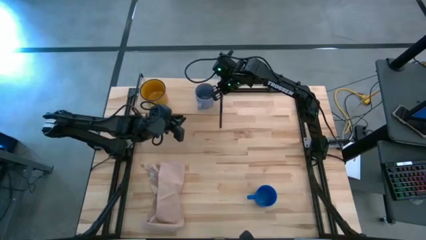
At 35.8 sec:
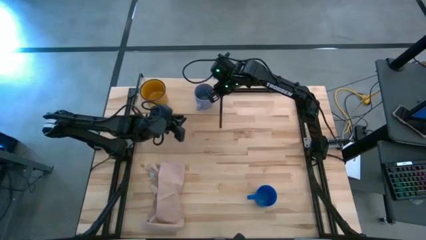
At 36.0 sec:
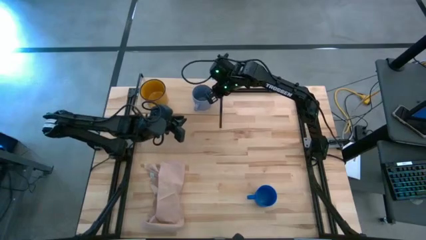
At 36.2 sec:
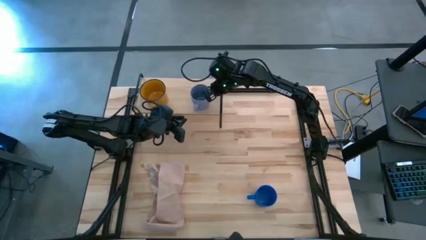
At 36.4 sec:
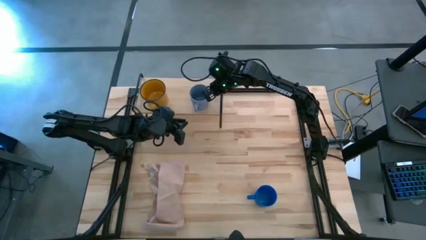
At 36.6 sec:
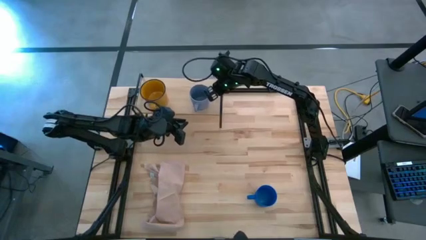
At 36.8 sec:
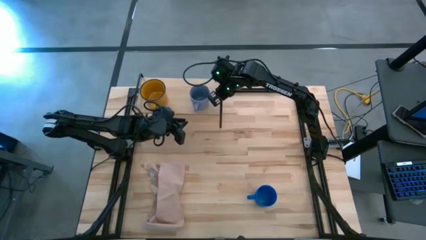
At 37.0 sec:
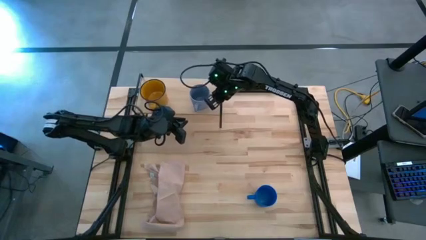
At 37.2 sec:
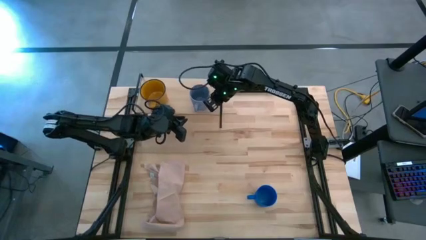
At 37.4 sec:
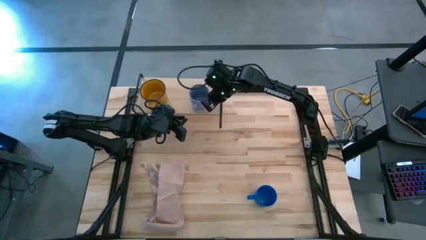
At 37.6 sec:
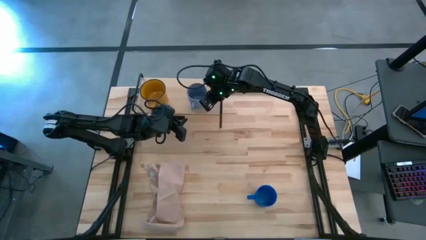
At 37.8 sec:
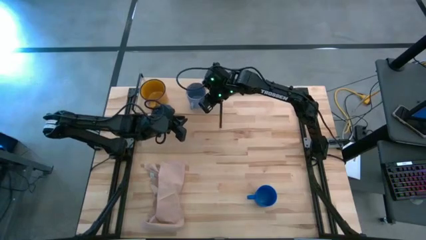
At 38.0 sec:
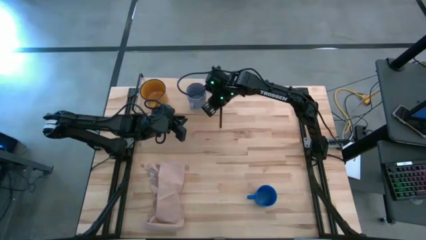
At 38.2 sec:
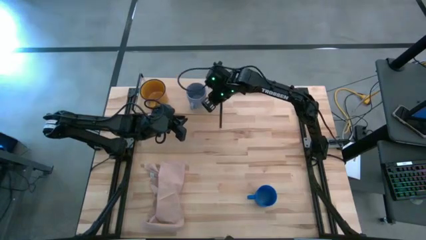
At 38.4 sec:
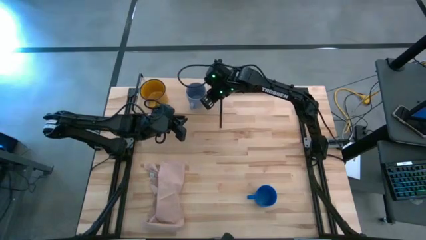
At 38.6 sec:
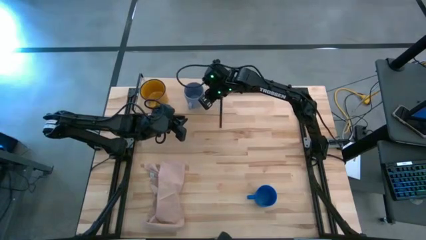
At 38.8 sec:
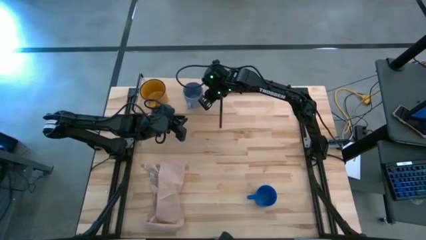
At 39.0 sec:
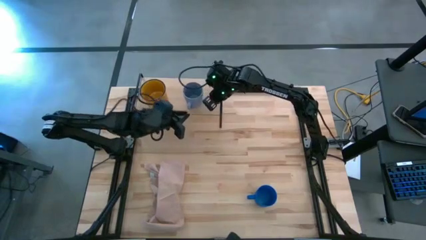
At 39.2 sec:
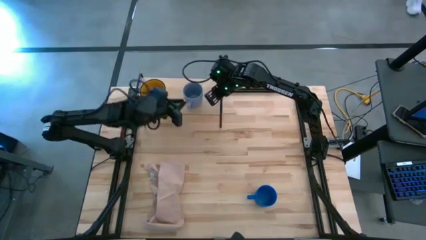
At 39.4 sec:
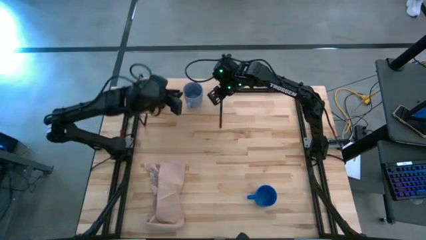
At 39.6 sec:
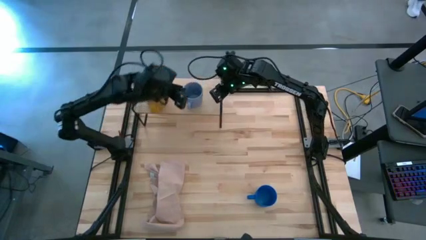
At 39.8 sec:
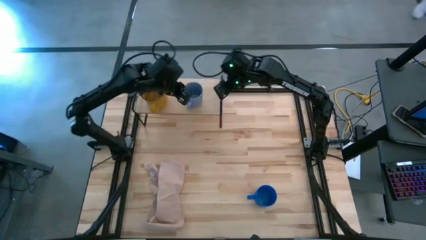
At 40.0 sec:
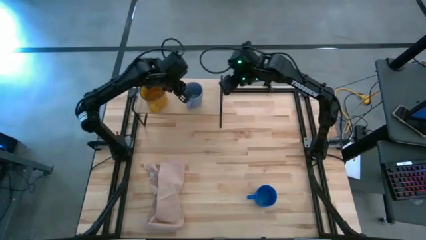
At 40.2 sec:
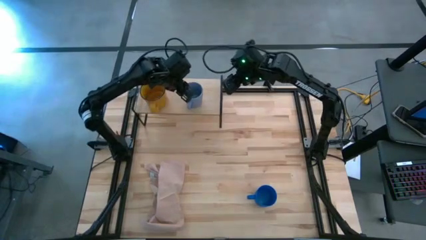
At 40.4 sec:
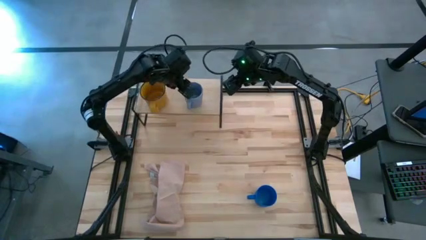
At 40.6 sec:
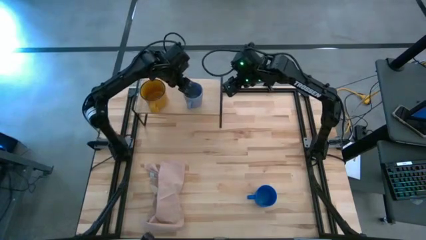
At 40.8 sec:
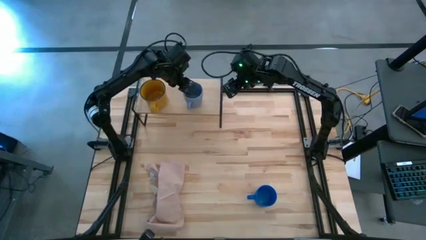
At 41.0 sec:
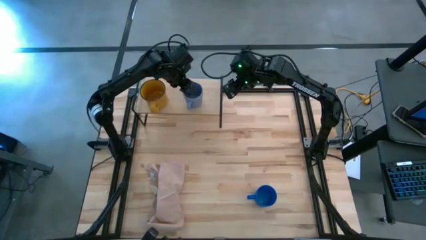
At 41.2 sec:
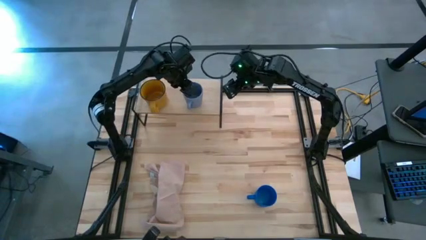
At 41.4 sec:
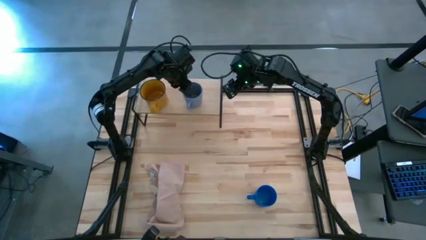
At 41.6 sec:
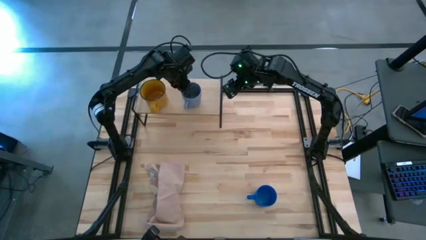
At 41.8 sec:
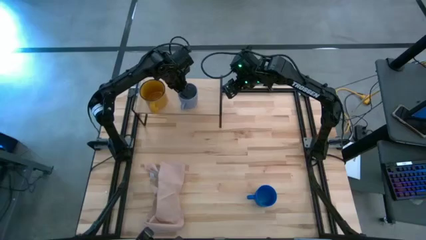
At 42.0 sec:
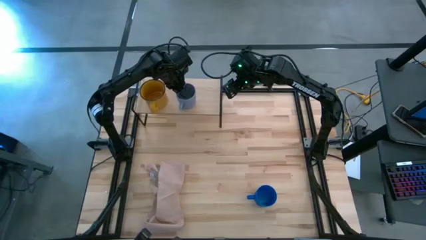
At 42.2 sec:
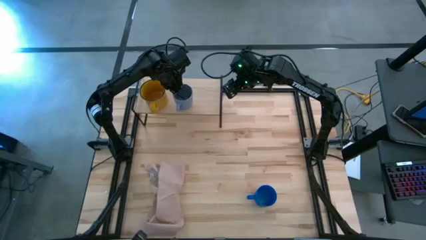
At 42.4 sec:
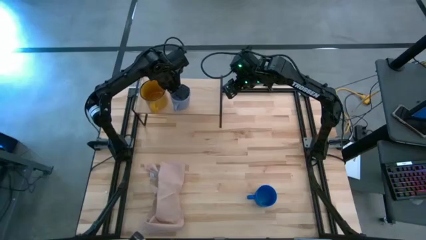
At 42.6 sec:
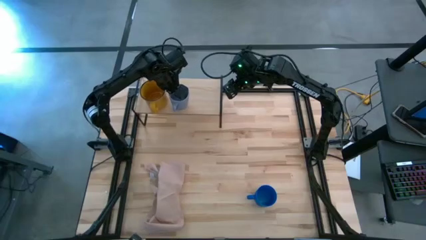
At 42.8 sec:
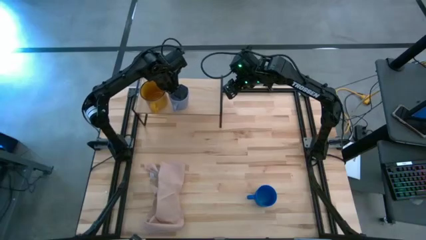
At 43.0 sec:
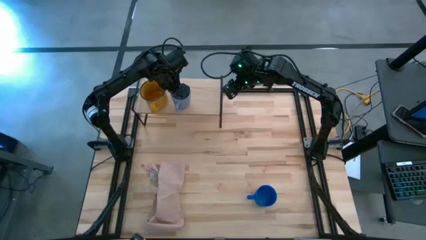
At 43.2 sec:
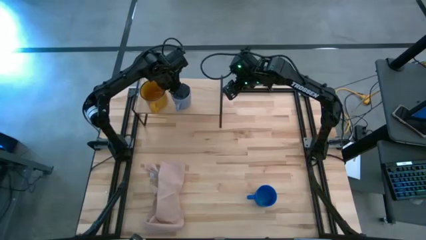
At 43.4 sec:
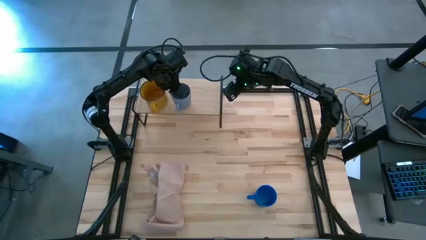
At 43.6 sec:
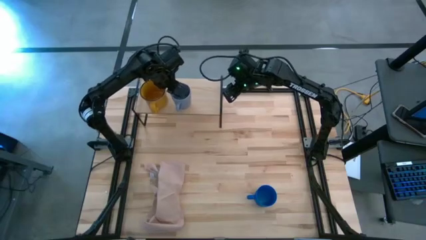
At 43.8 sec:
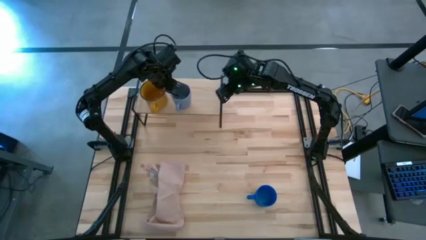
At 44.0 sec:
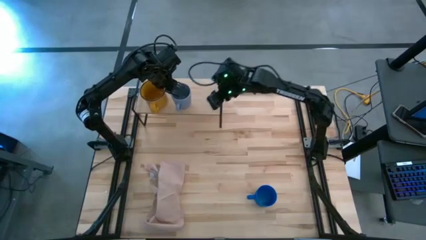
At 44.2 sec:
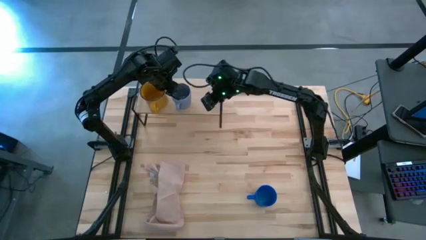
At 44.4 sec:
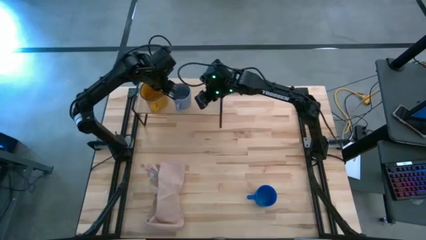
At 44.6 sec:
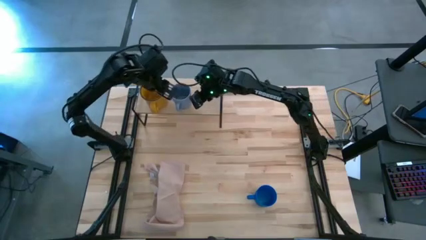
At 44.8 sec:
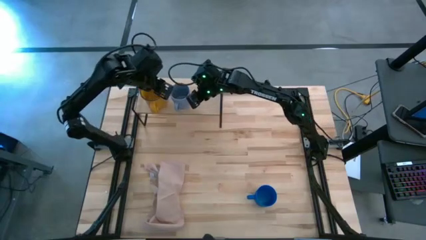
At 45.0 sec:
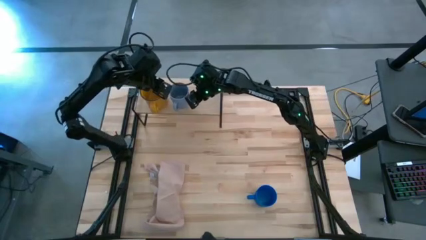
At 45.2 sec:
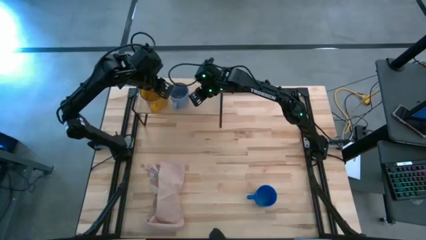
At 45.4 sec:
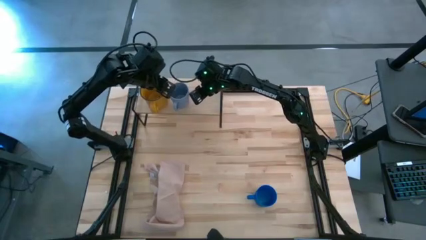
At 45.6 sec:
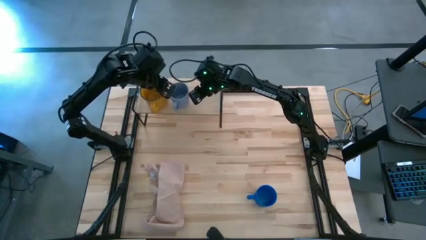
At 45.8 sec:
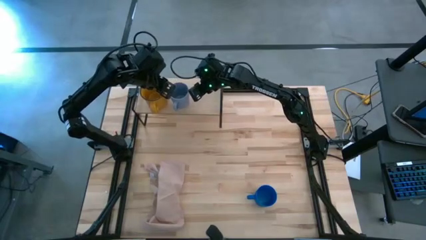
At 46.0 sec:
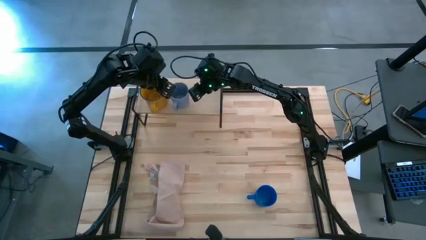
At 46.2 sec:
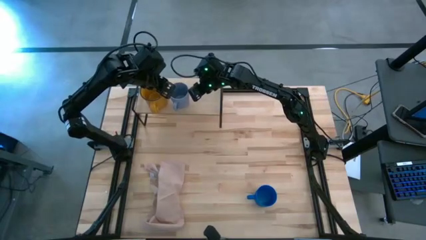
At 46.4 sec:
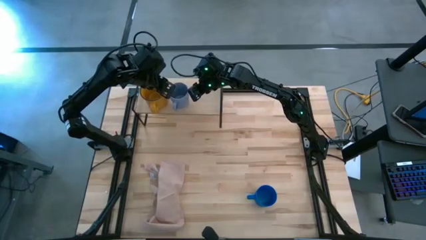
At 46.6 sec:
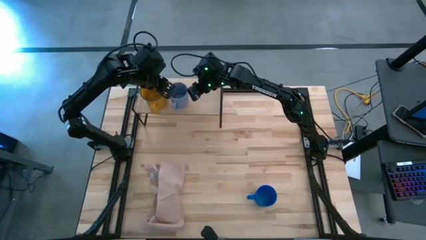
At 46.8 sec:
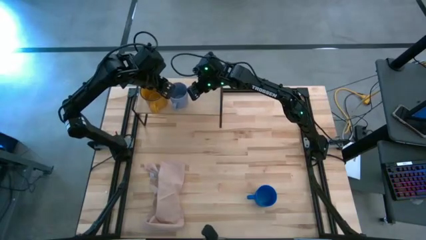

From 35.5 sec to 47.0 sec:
Task: Stack small to large cups/mugs on shelf
Put the light blue mug on the shelf
